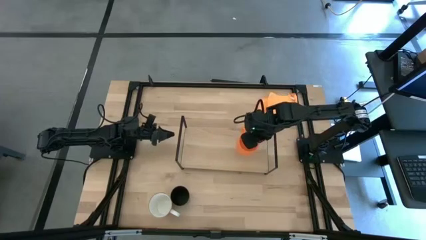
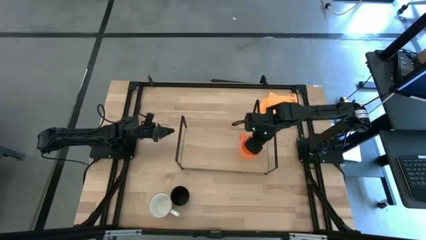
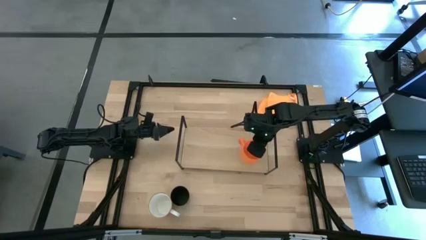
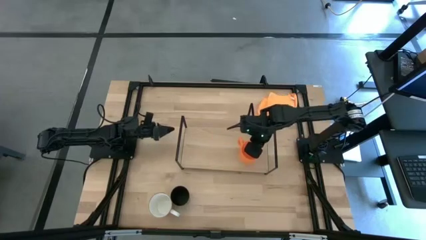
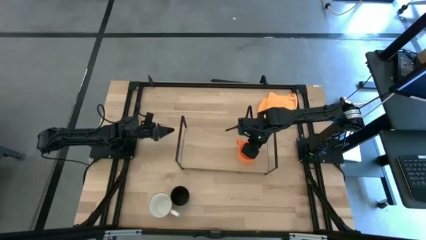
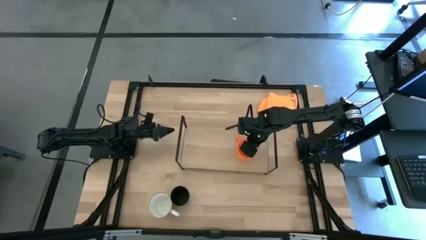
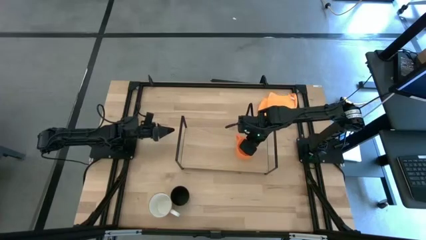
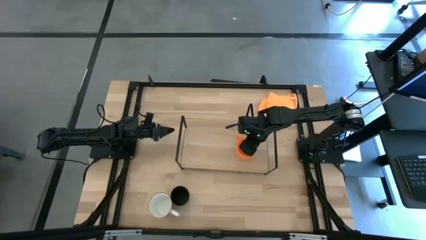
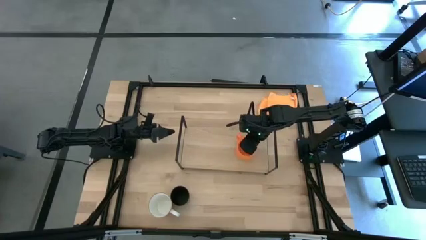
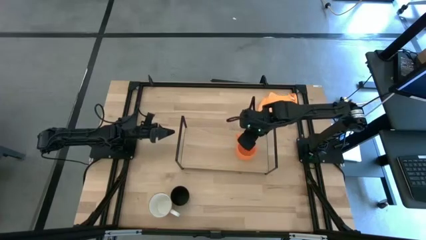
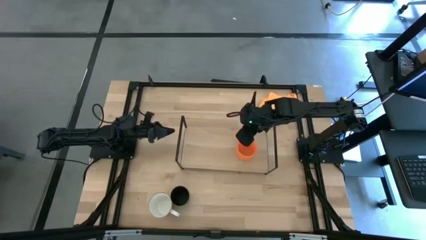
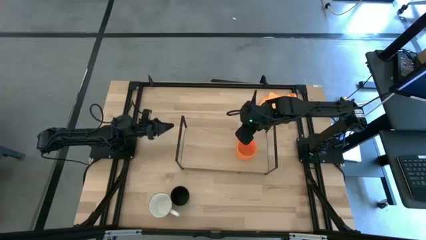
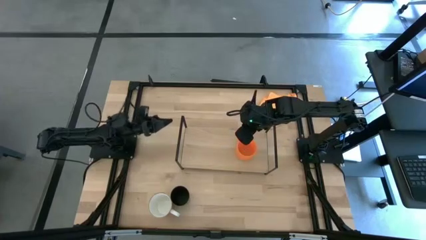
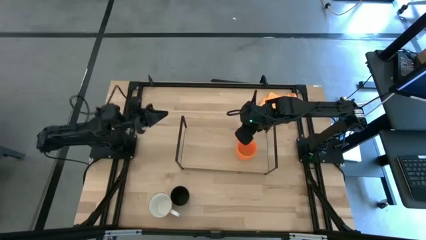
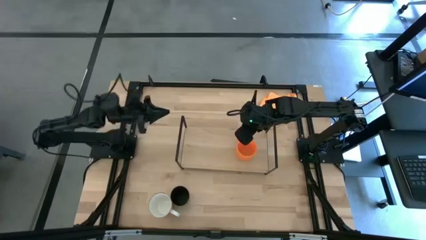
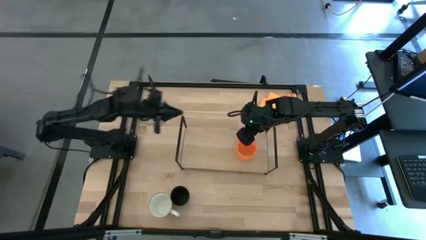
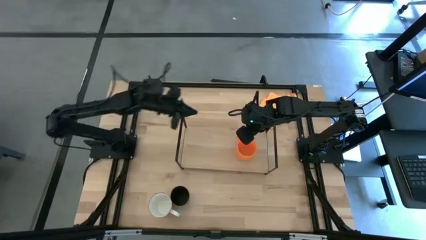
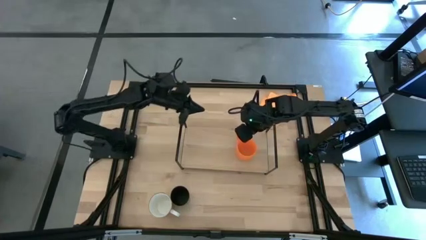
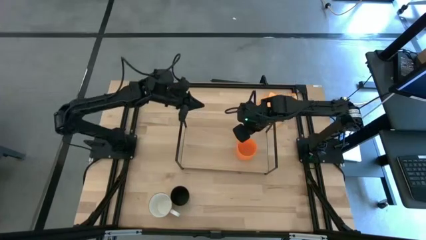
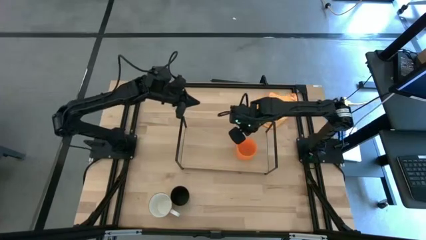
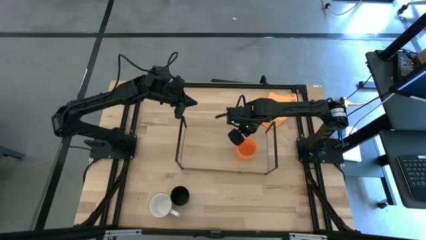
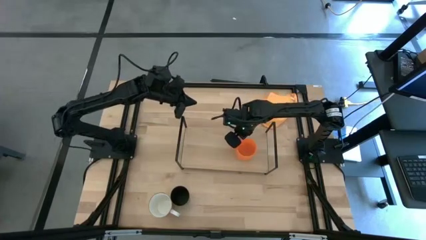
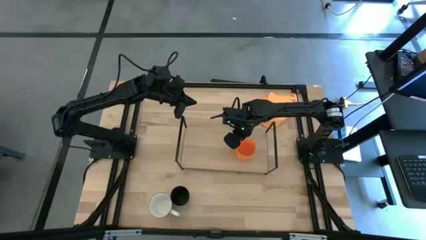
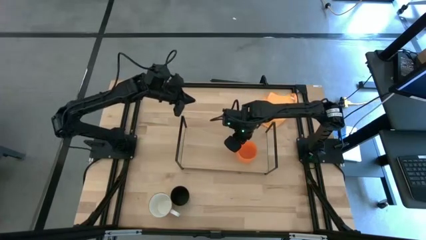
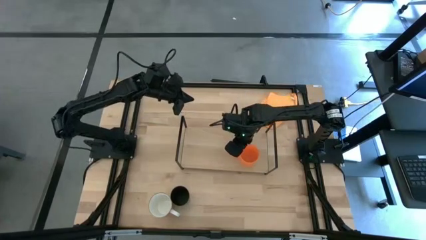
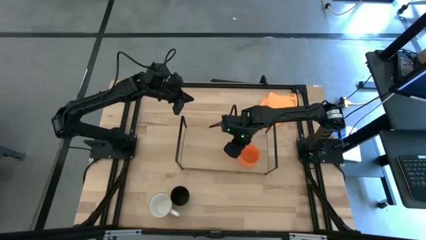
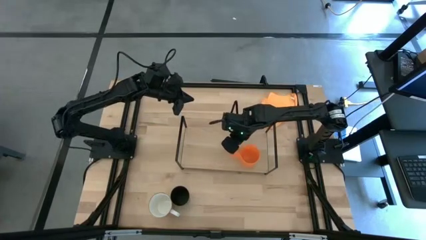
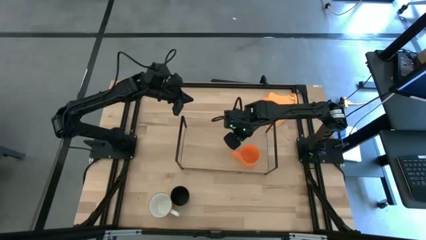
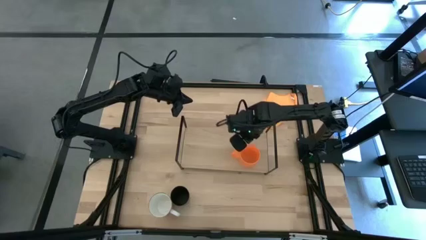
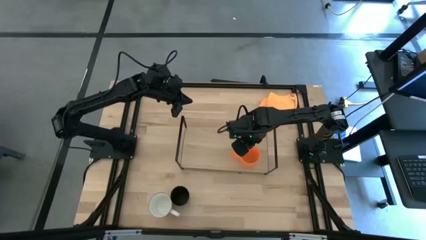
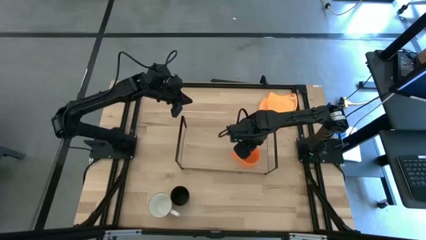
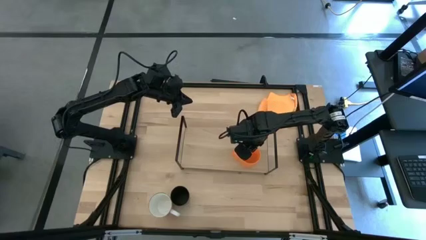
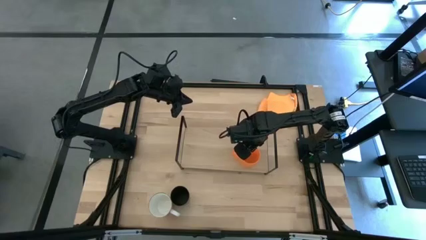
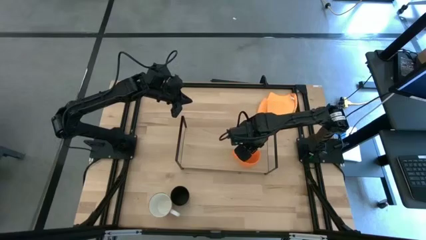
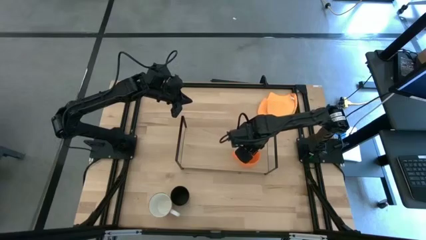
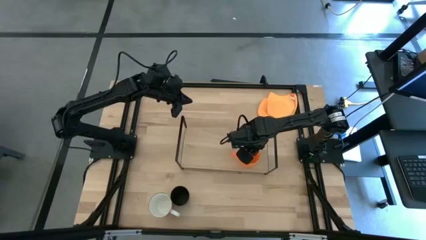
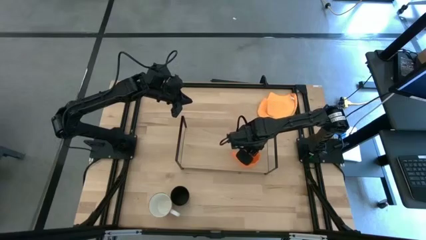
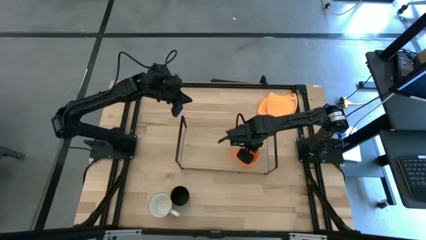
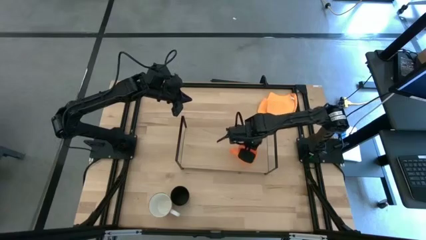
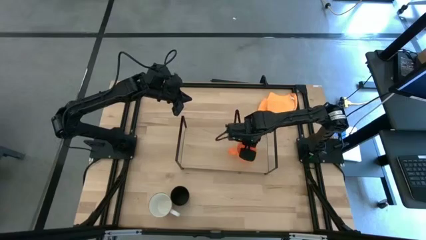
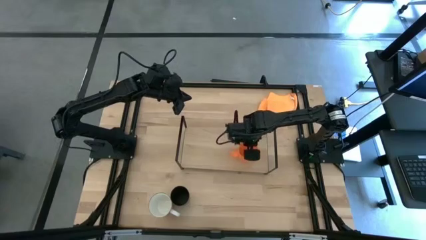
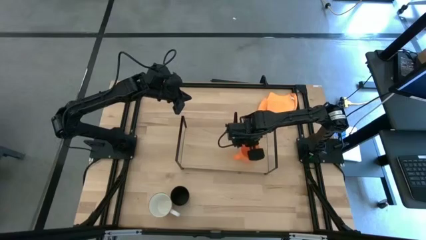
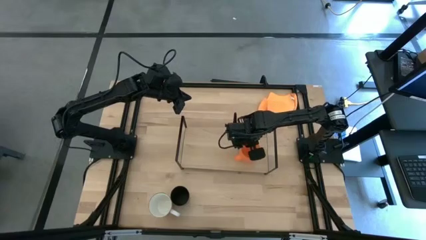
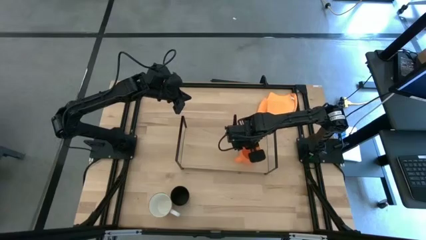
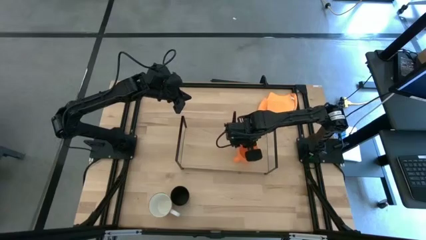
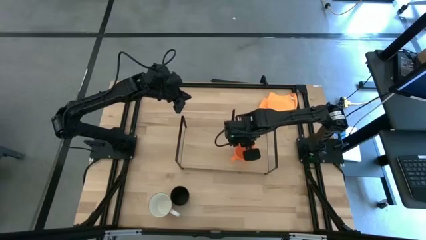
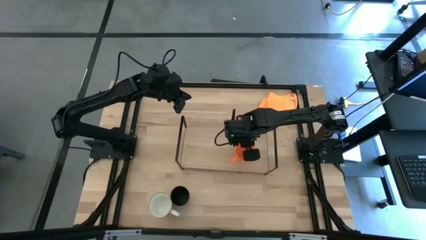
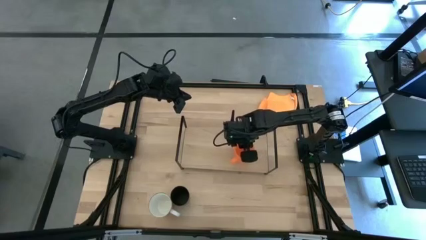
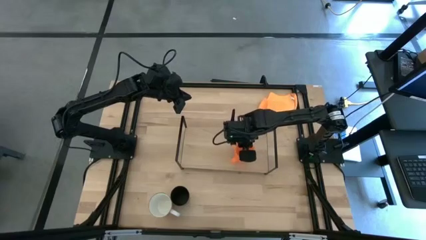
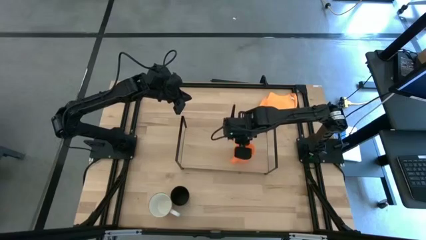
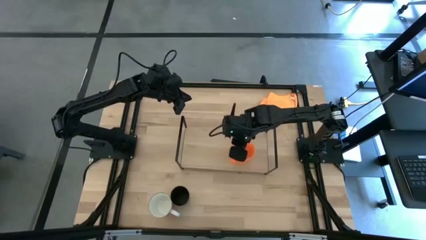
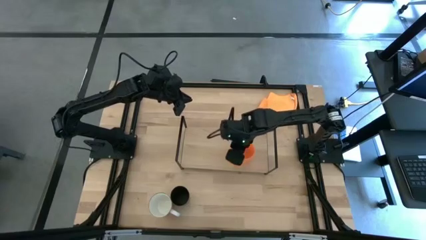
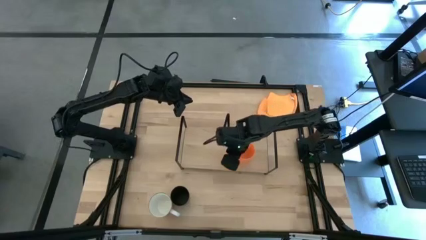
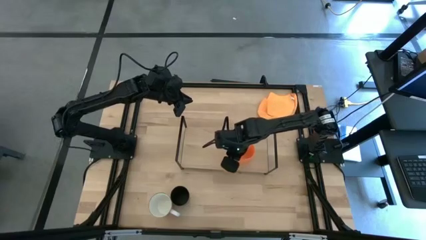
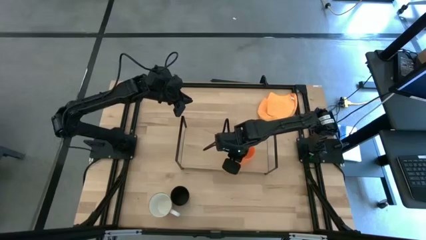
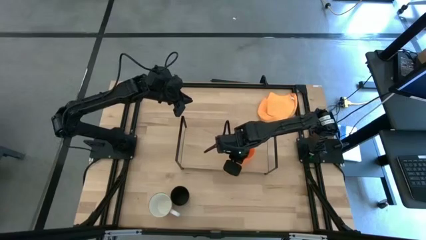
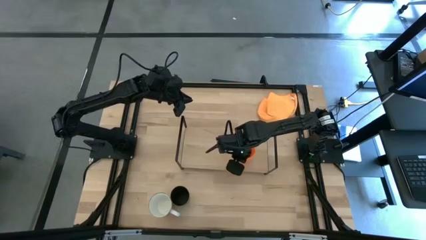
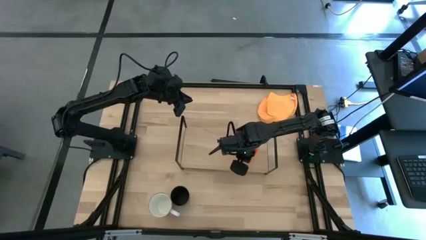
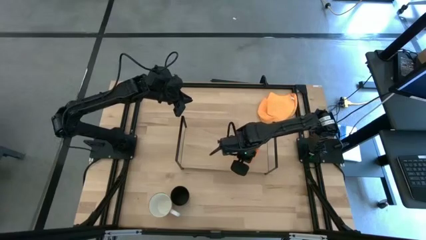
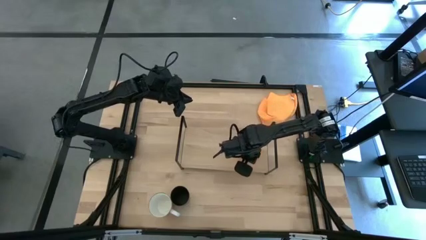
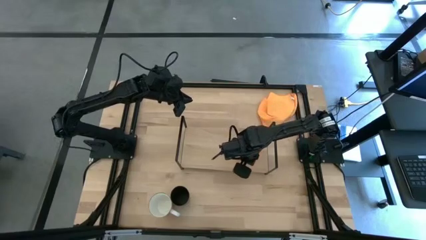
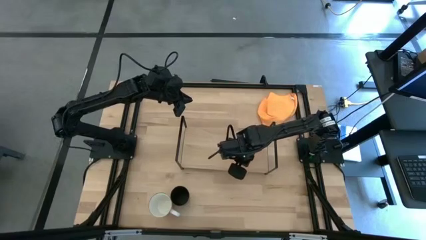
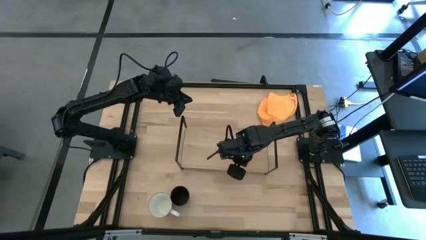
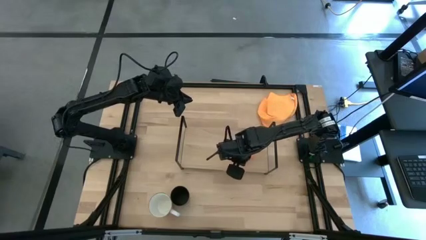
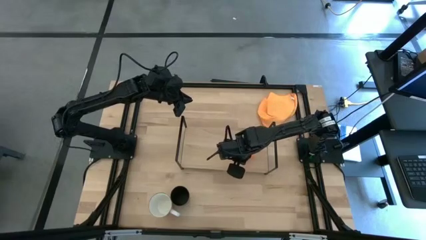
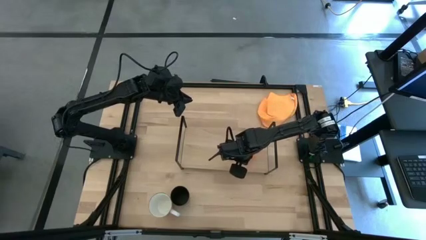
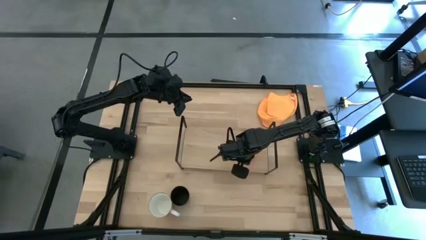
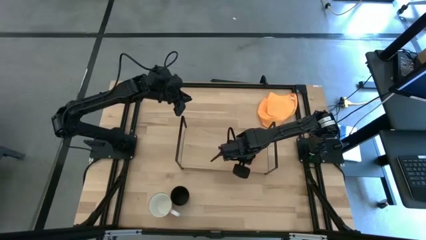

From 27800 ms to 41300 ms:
Task: Stack small to large cups/mugs on shelf
Put the orange mug on the shelf

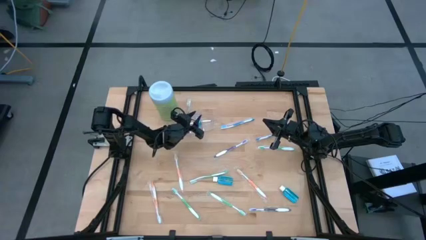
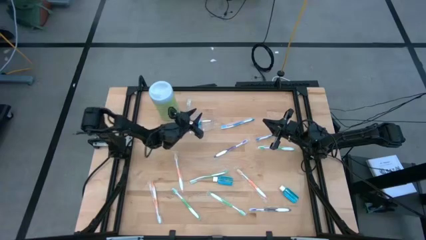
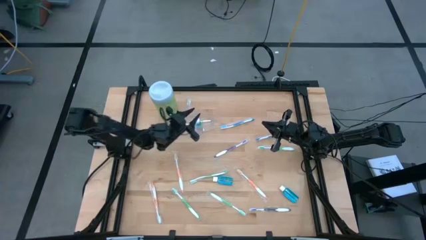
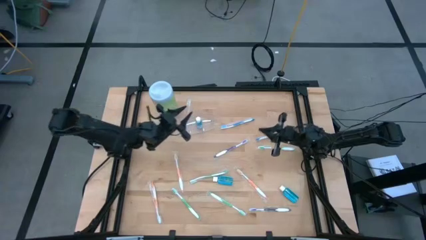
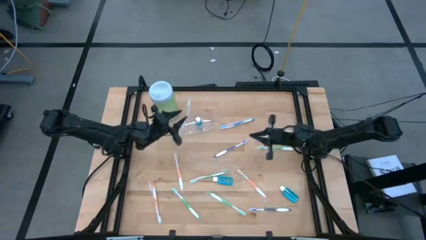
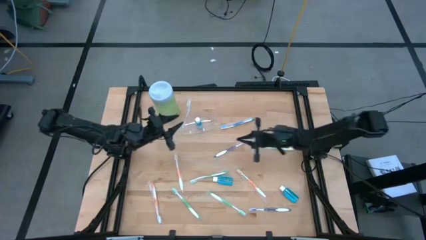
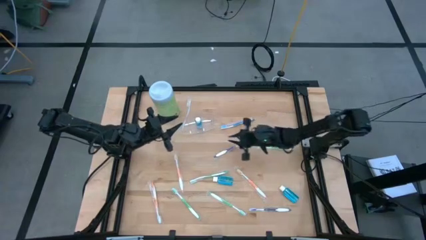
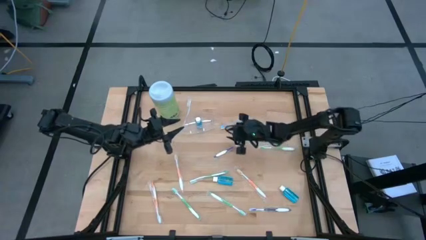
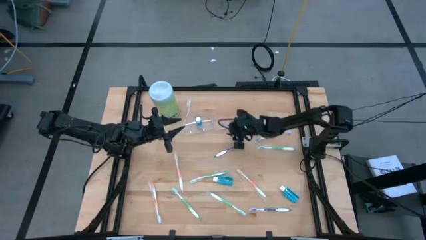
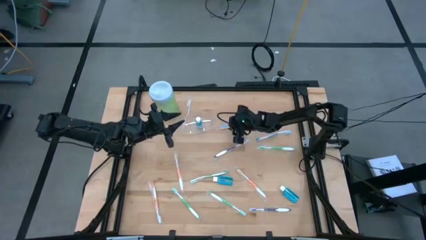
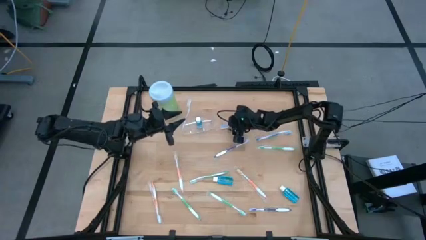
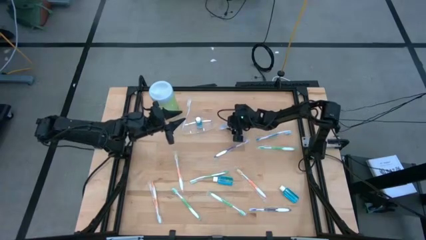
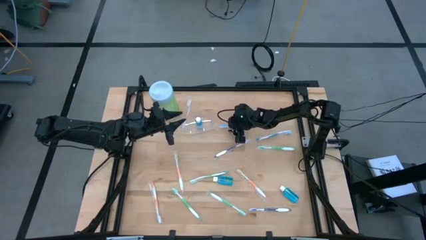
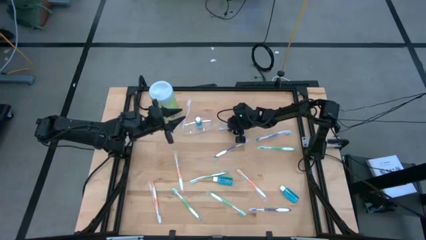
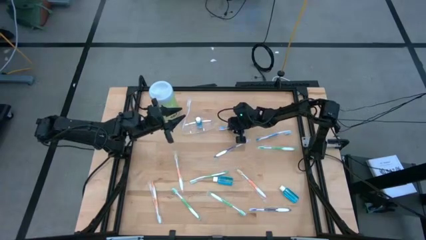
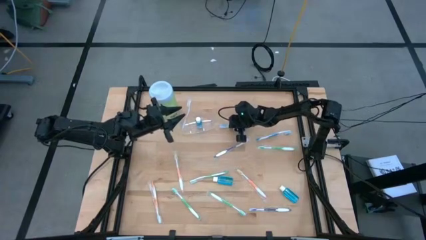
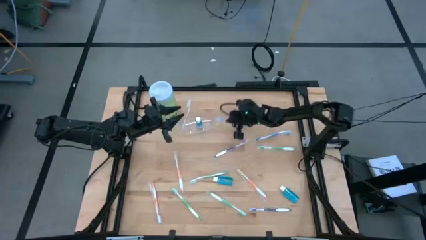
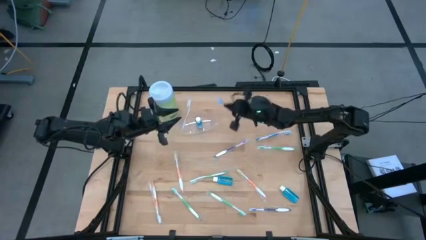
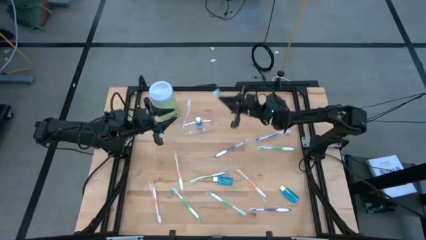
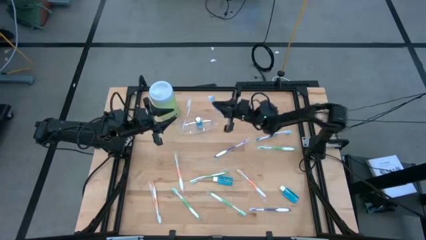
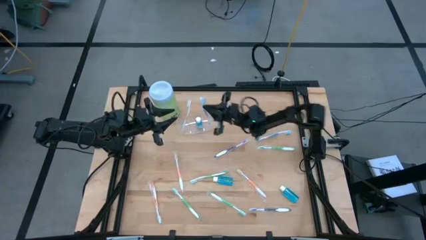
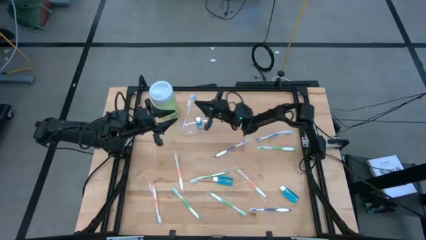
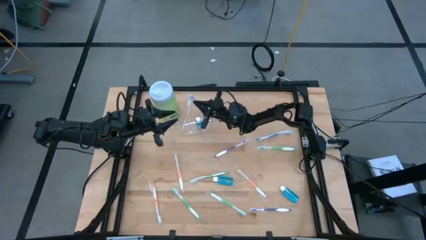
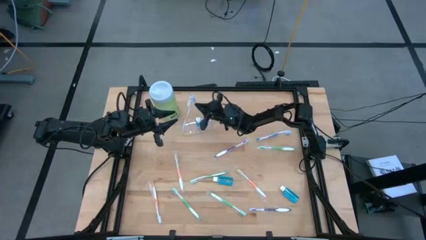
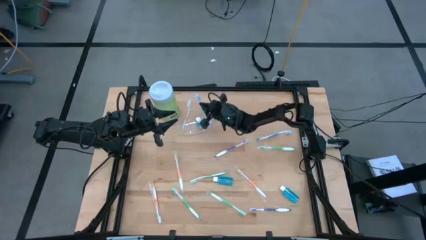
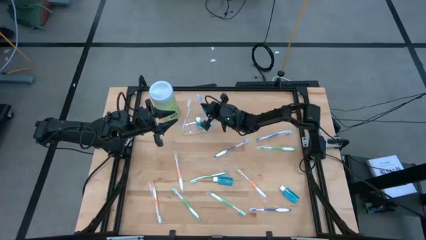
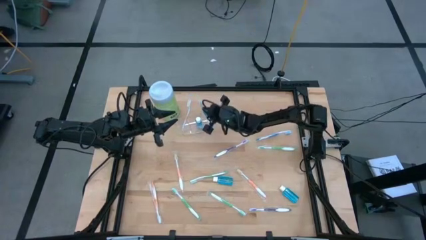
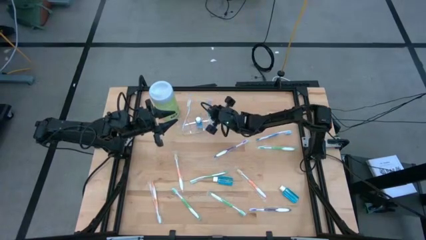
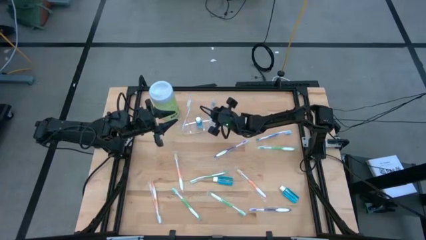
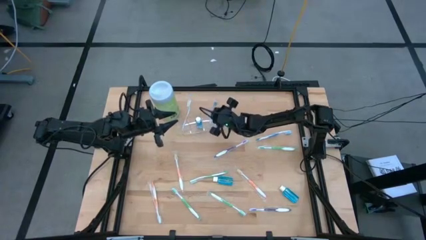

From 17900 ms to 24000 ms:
Task: Pick & Place toothbrushing station
Put the blue toothbrush into the transparent organizer
